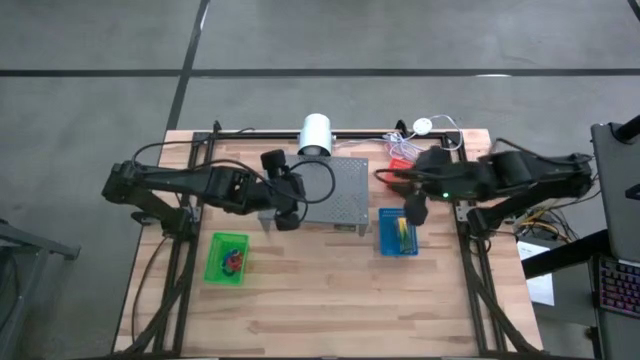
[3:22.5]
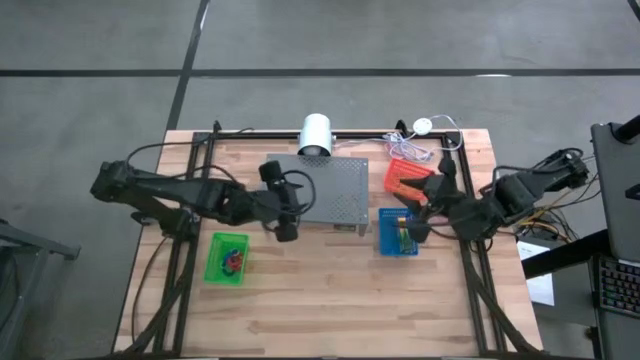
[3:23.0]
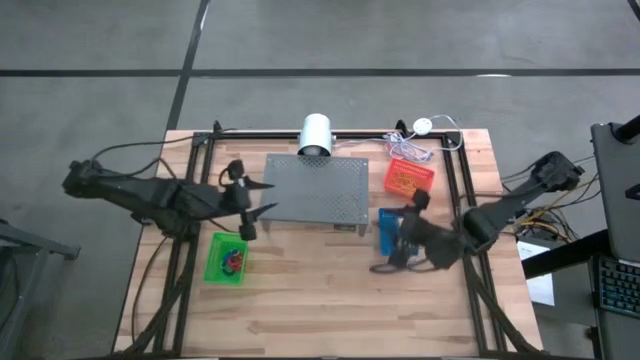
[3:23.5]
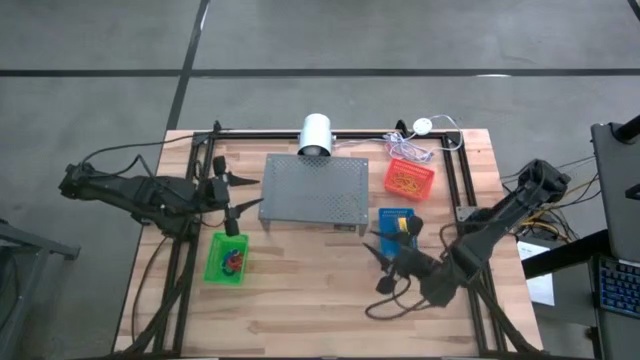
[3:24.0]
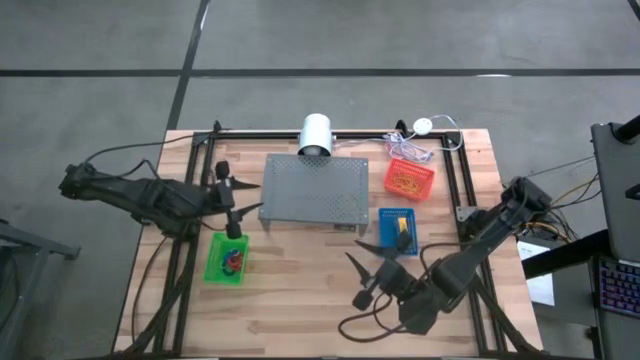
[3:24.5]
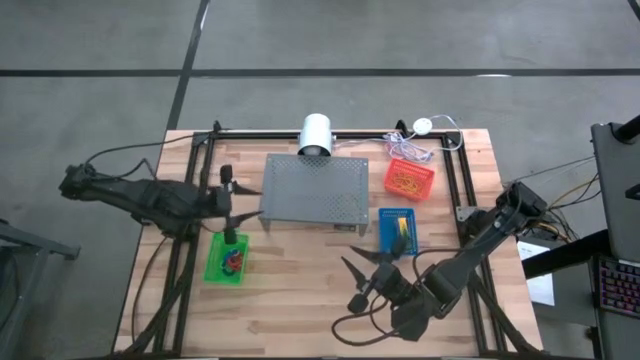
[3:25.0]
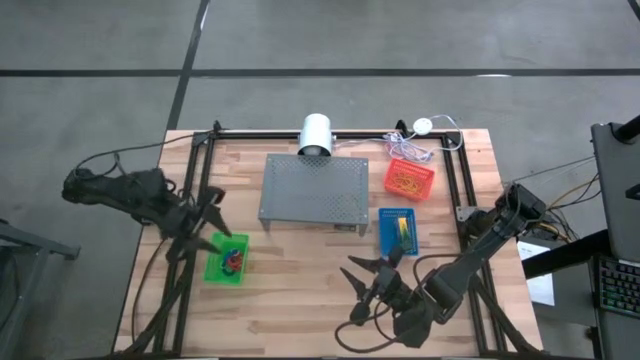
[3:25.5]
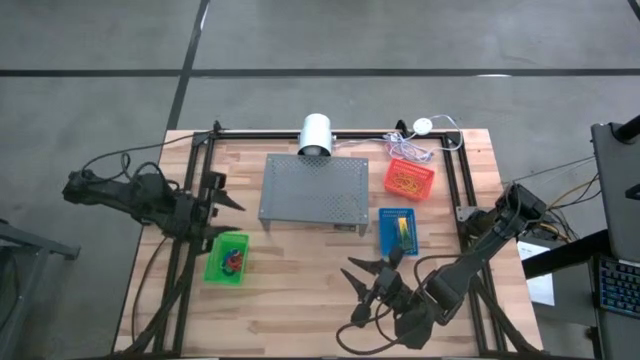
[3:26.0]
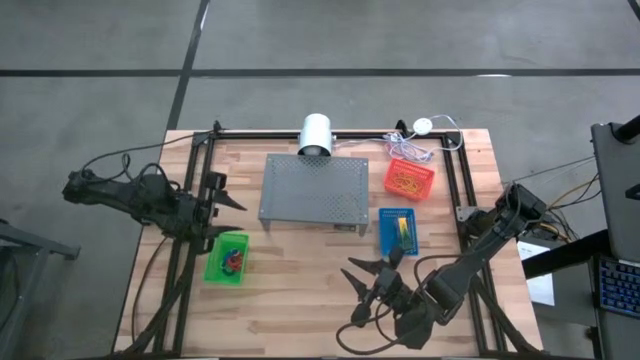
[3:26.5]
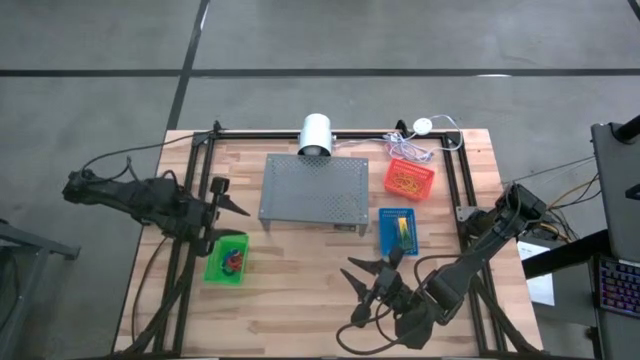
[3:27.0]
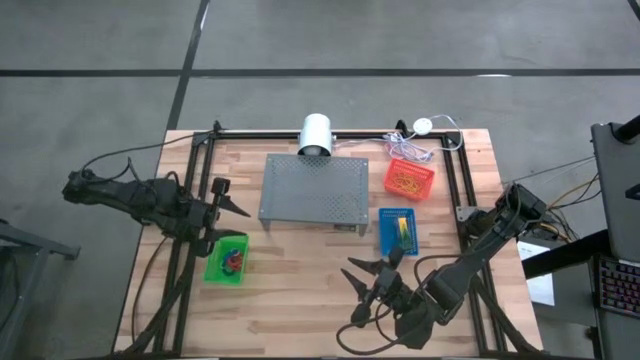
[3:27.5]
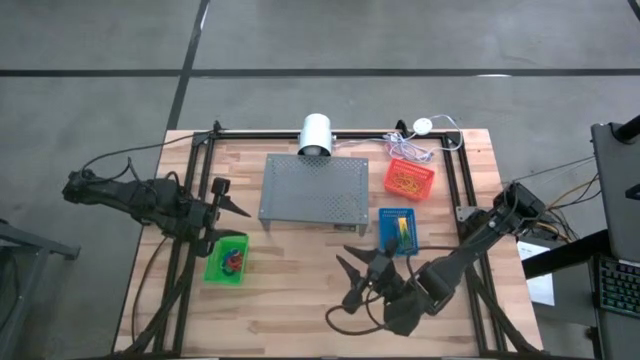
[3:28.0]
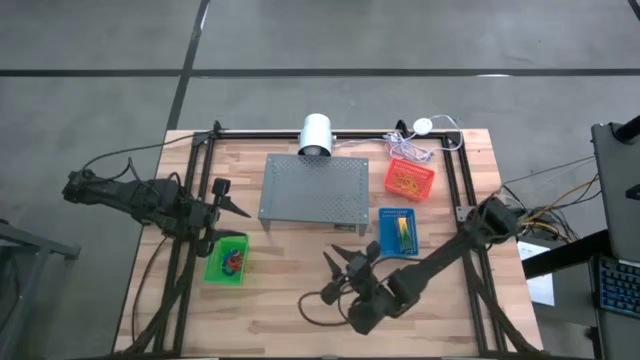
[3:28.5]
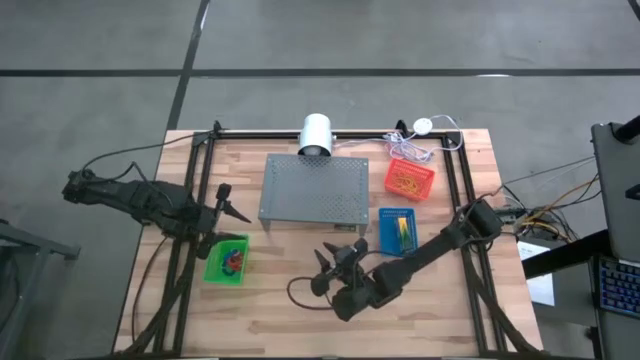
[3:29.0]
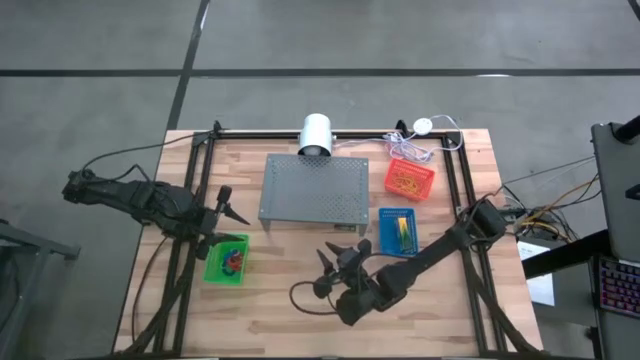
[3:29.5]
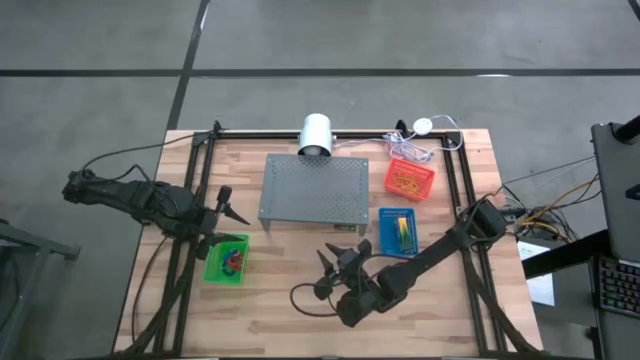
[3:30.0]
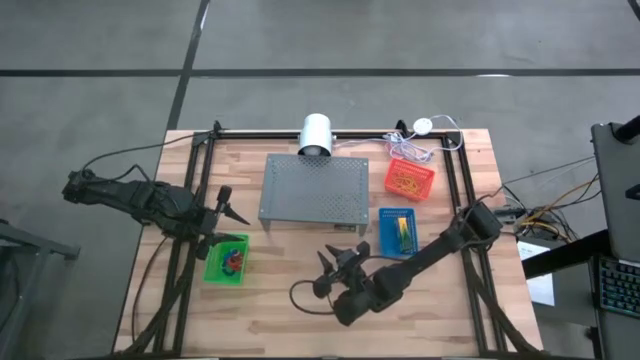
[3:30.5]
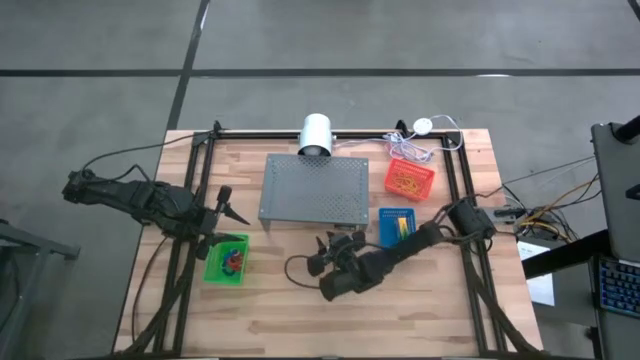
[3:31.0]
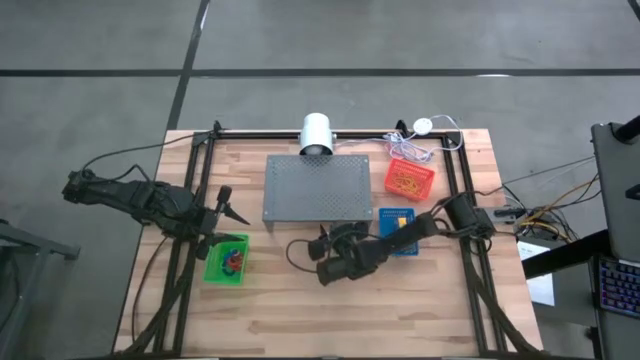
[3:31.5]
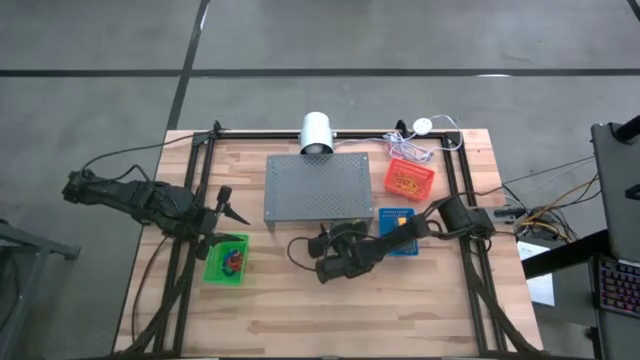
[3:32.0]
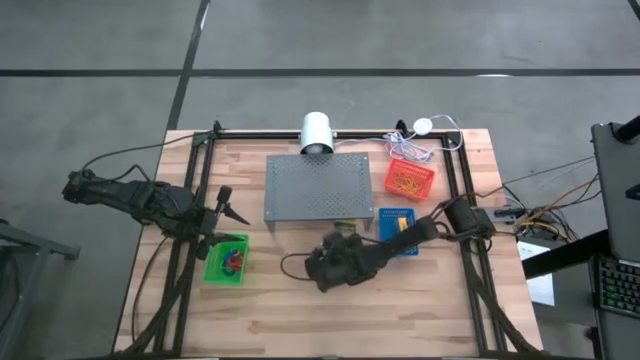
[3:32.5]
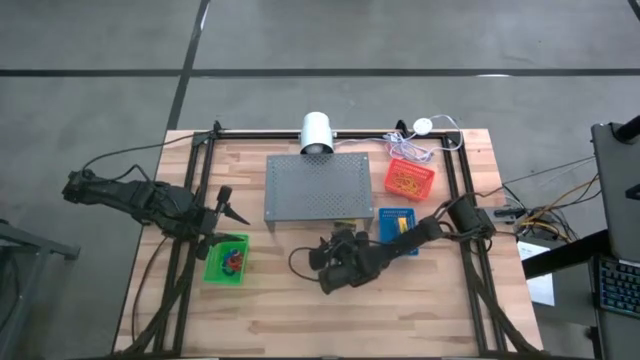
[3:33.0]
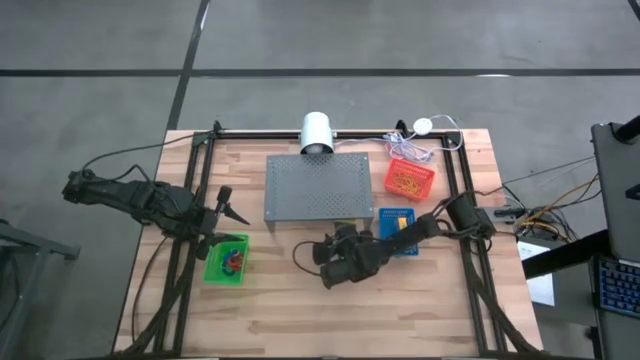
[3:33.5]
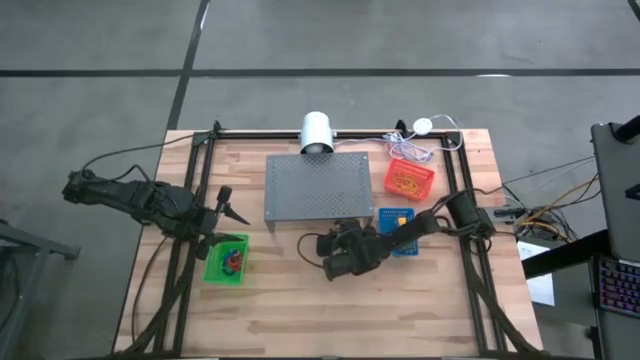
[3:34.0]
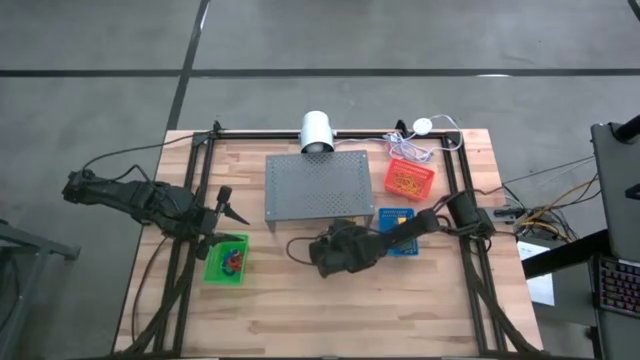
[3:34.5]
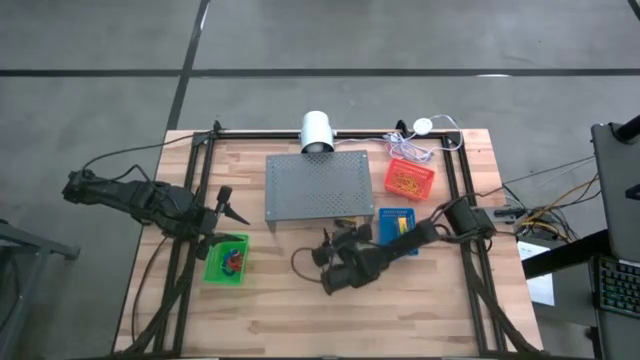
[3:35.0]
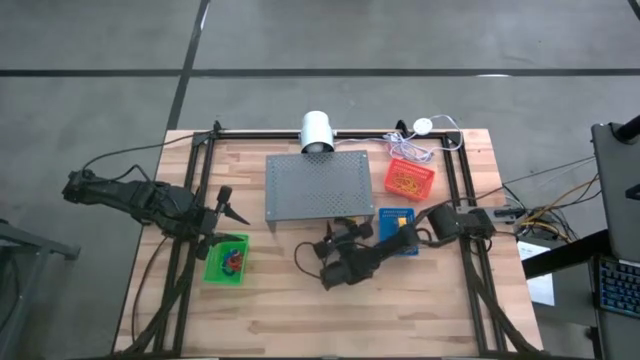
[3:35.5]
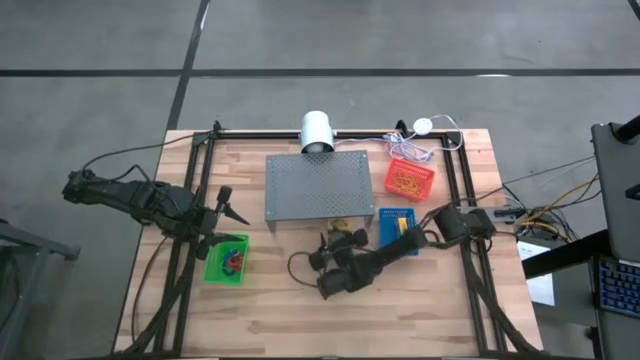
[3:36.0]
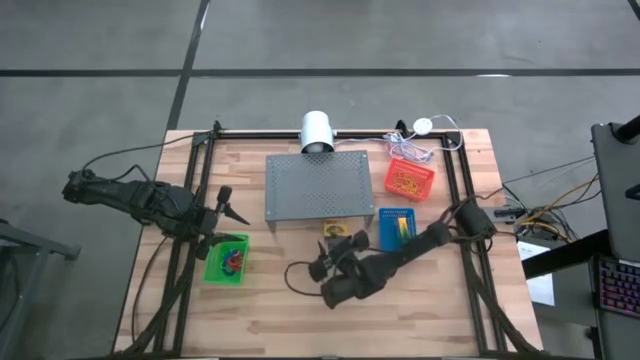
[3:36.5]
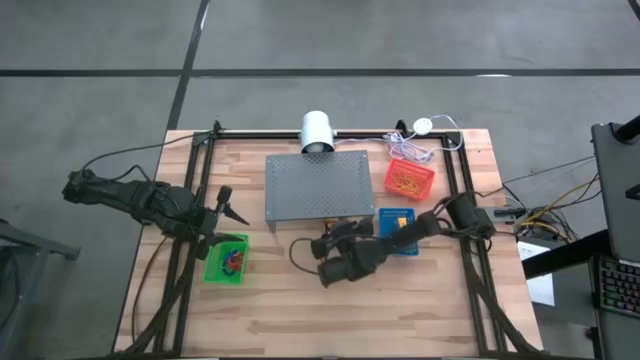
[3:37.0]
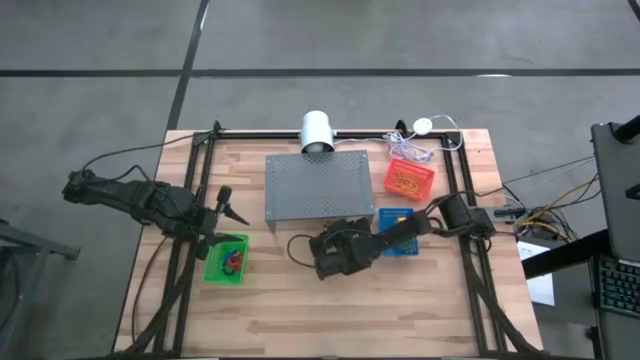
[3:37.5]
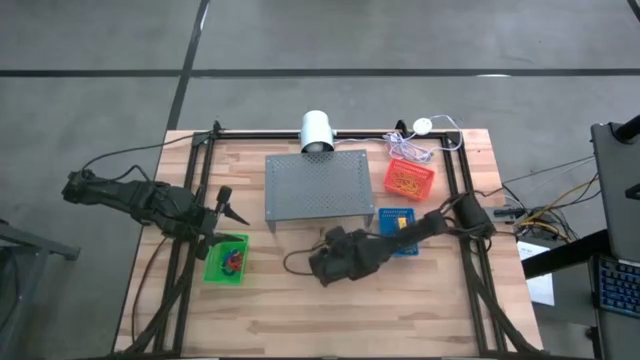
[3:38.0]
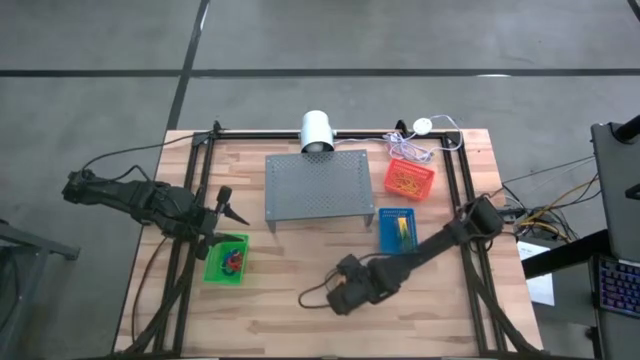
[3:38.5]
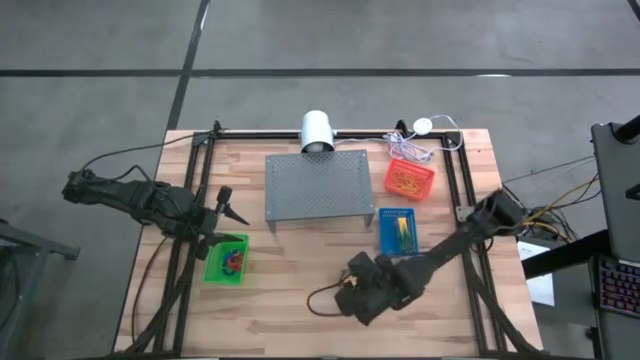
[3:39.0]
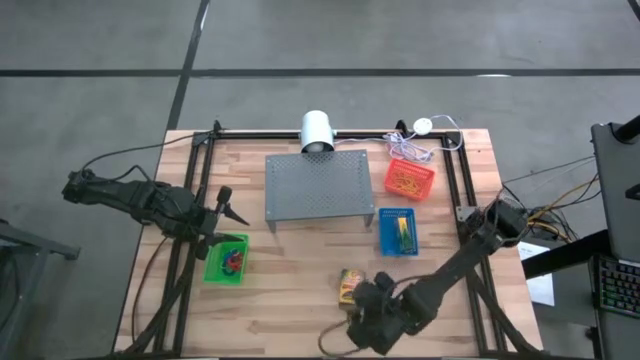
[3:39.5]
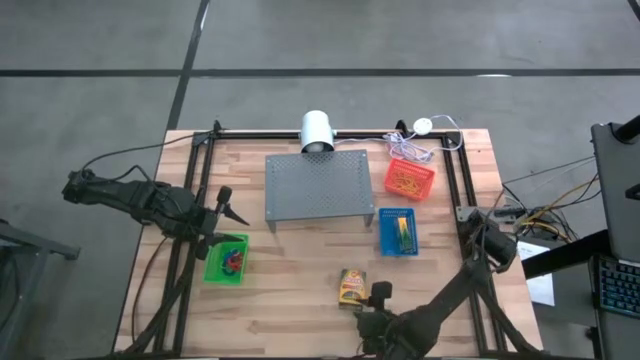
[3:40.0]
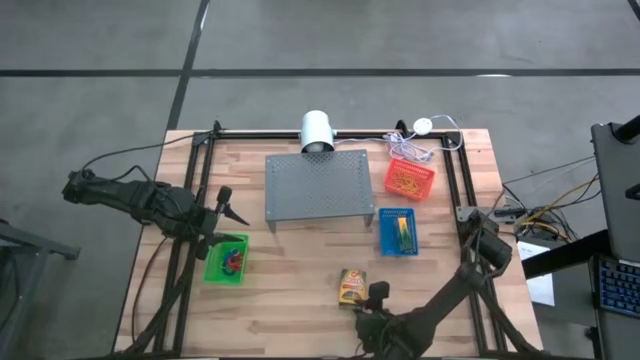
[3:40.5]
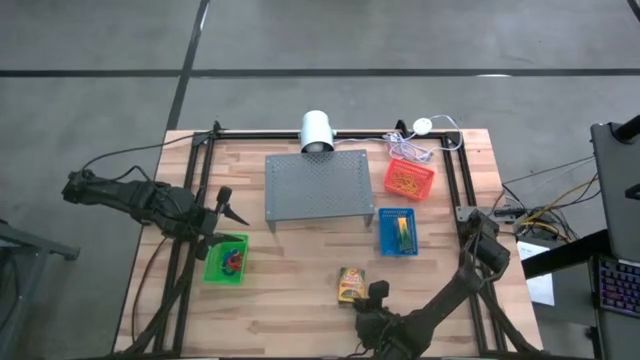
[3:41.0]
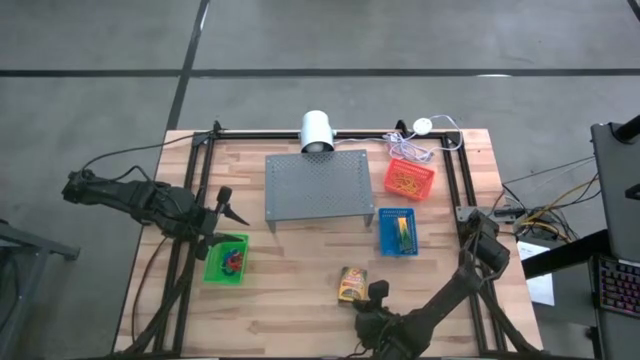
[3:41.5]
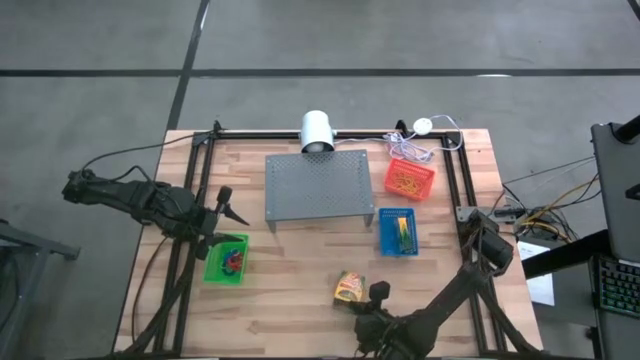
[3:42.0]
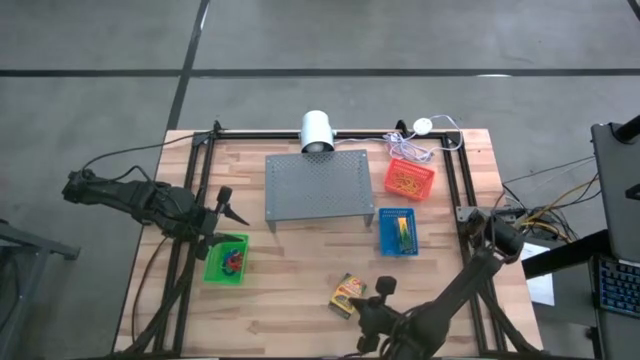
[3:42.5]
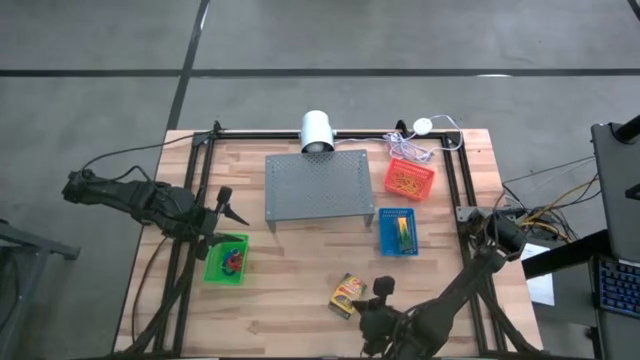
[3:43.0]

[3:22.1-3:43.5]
Task: Pick & Place Office Desk Supplies
Put the yellow crayons into the blue bin
